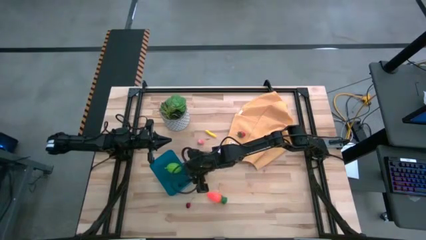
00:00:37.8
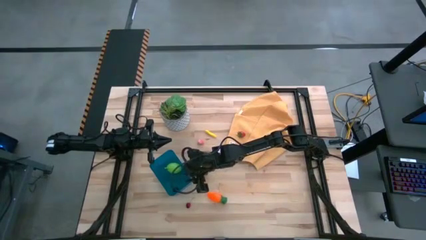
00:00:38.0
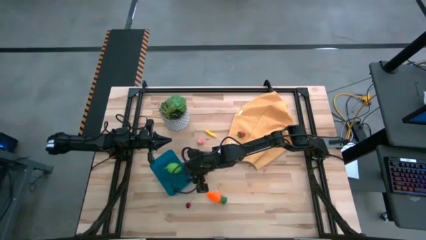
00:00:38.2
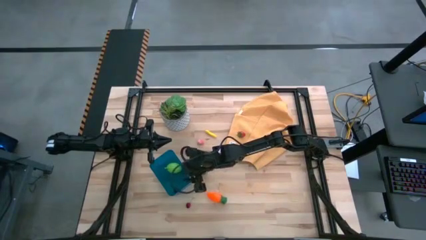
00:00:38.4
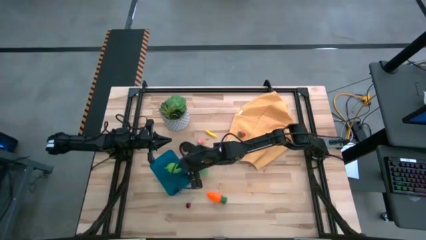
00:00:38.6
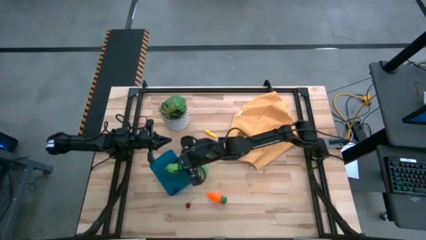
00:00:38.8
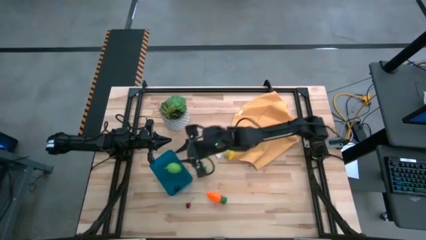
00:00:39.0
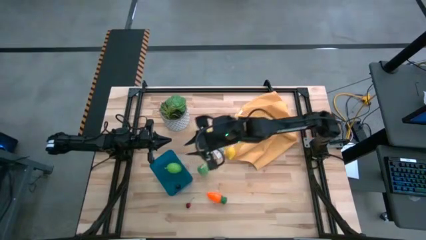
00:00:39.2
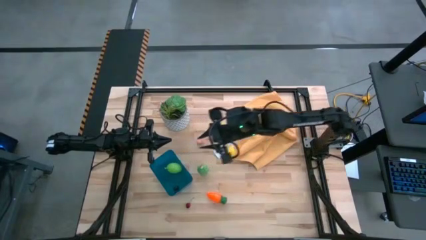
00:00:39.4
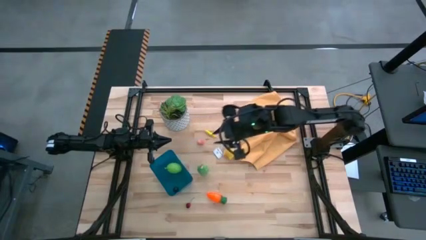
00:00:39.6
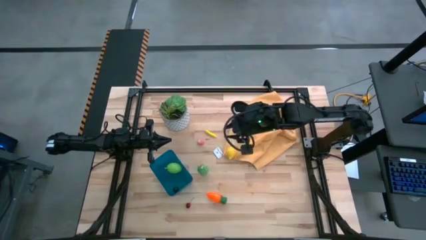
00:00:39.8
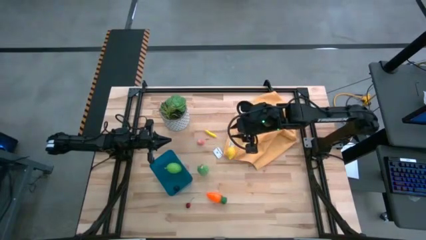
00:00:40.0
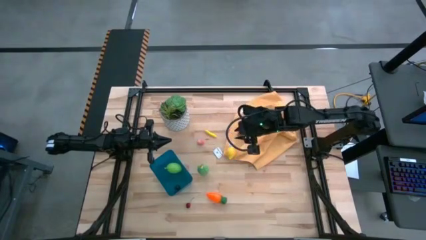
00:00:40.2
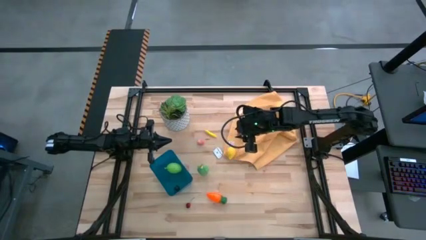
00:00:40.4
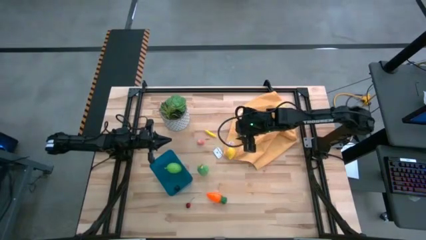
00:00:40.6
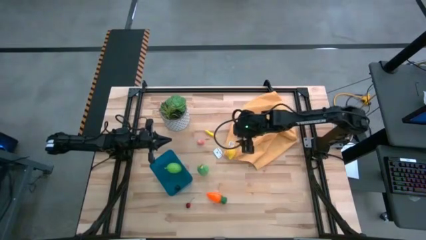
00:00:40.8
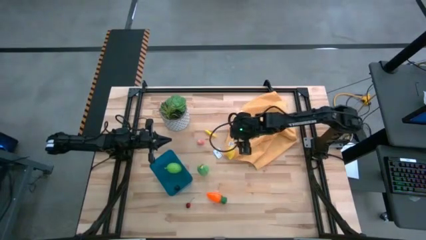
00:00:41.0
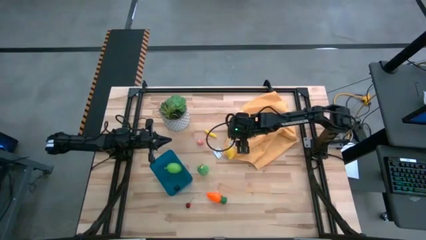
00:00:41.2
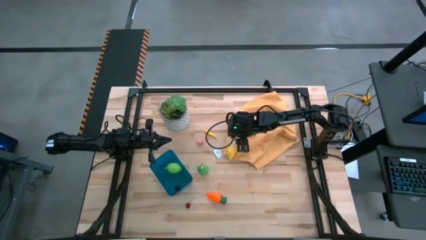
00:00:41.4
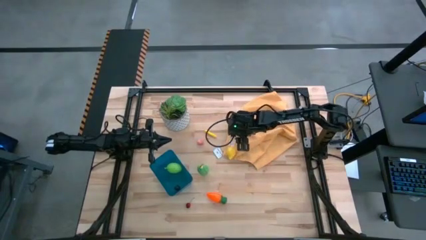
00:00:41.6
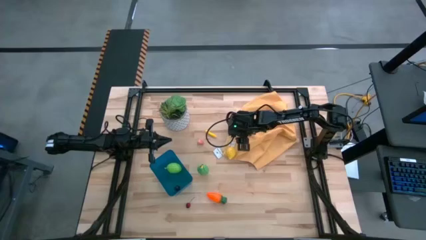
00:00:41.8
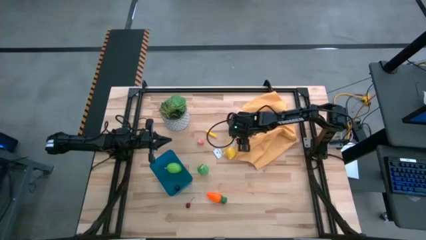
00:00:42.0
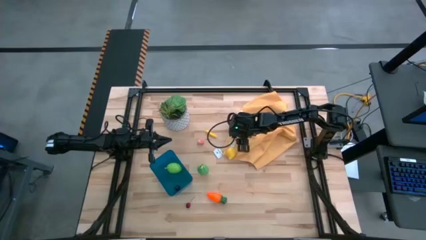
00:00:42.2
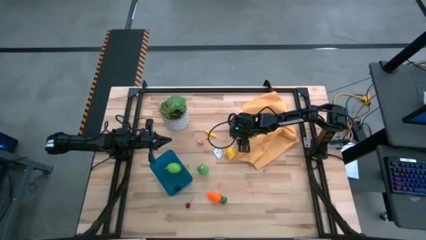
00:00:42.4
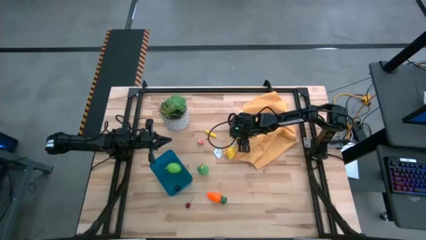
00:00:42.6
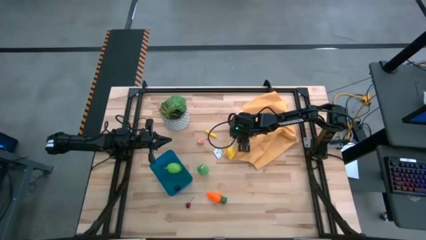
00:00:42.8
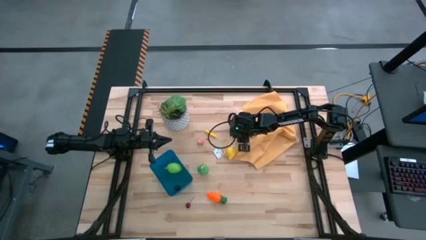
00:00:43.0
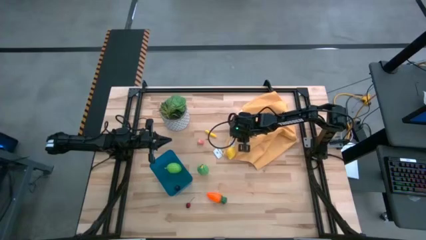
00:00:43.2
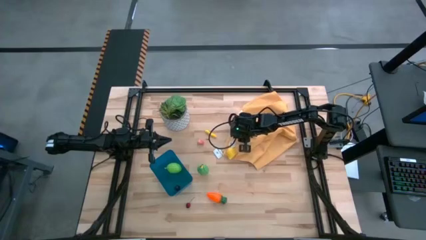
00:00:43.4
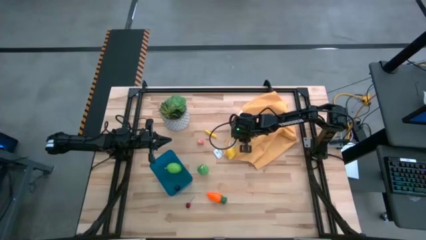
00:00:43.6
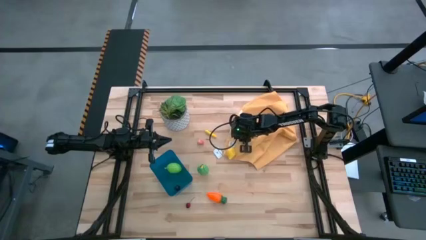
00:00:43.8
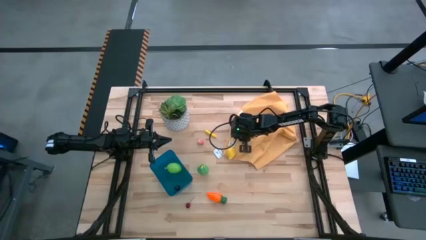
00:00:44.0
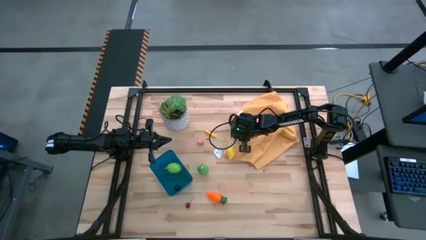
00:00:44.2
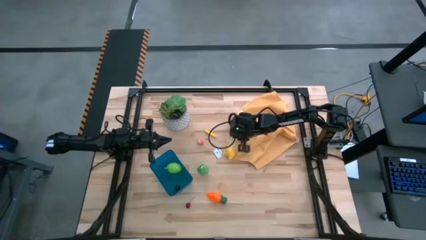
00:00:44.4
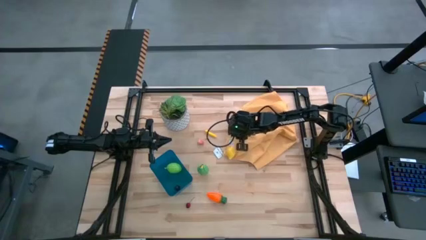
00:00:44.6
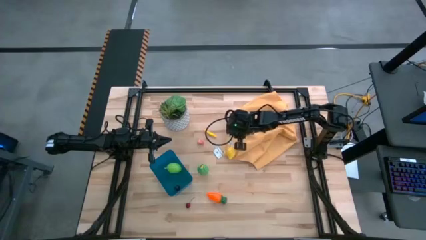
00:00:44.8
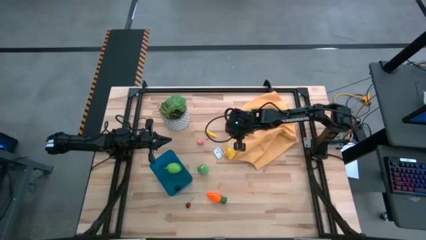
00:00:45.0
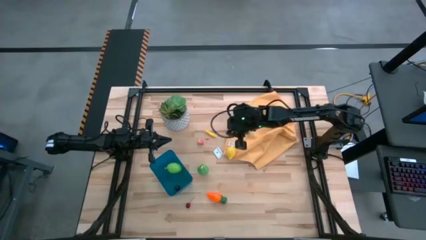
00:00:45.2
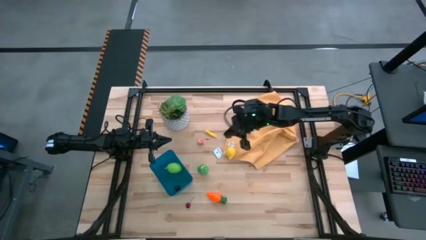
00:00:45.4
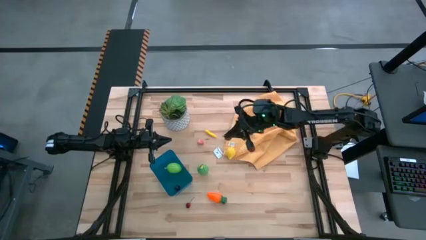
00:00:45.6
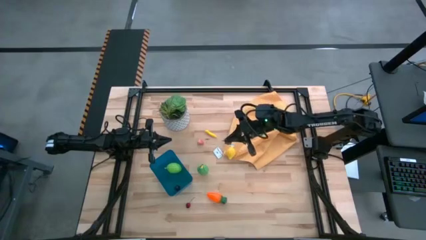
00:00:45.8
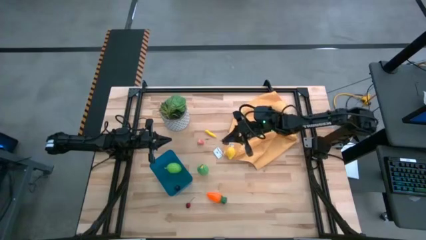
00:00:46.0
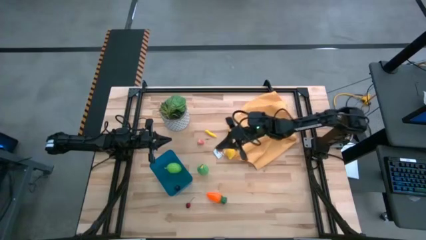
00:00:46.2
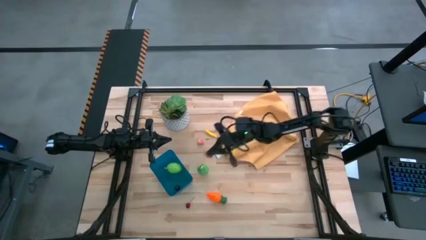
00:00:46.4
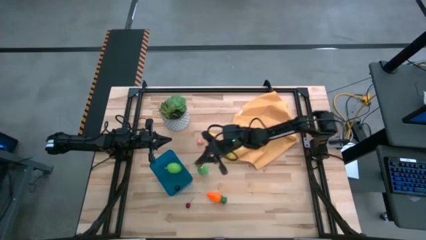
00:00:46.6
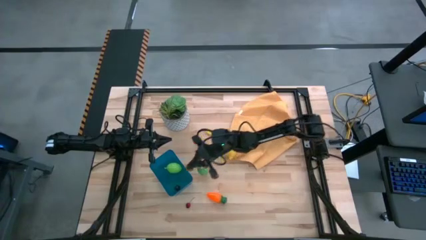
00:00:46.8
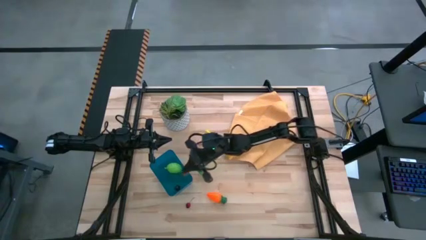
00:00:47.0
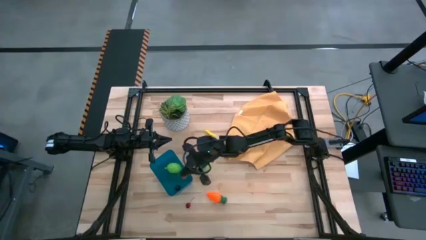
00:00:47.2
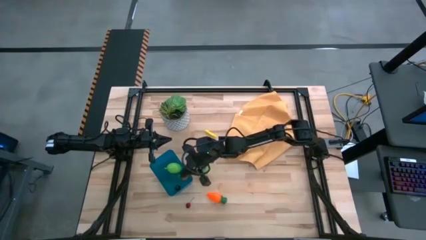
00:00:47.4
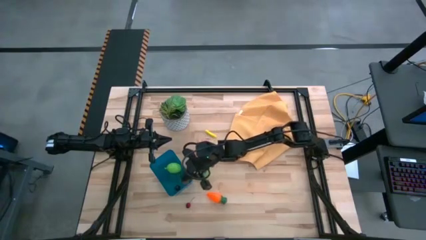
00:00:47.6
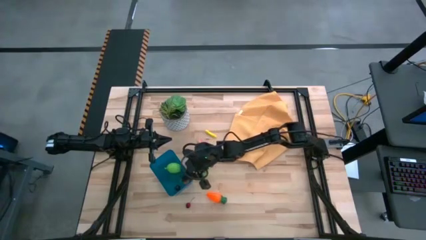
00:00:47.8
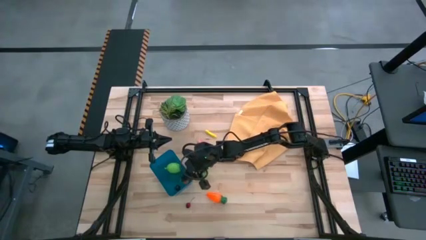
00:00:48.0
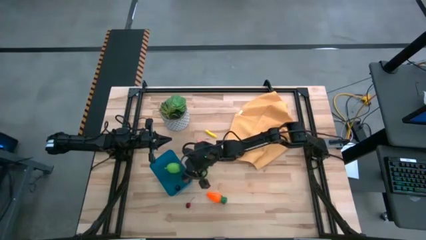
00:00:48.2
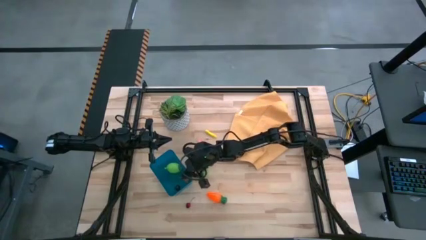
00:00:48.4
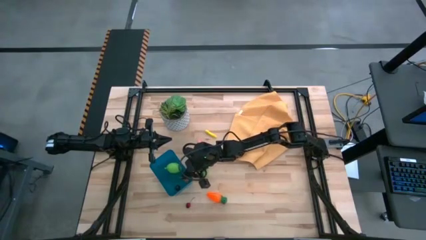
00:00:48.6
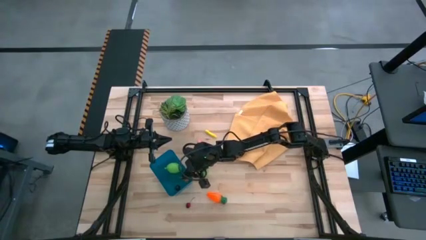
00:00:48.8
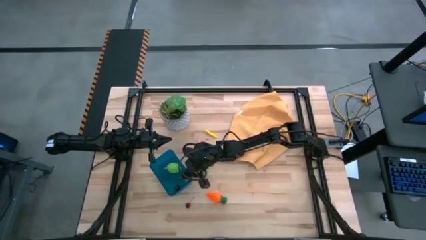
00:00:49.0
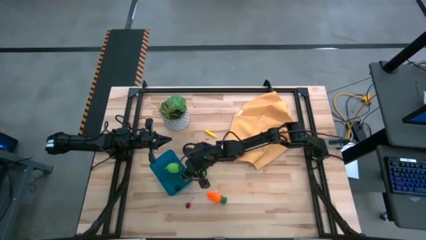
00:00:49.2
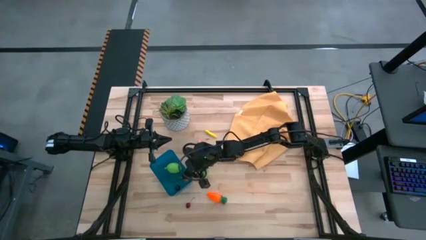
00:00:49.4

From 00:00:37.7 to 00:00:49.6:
Task: Pick and placing Produce into tupperware
Put the red strawberry into the blue bin

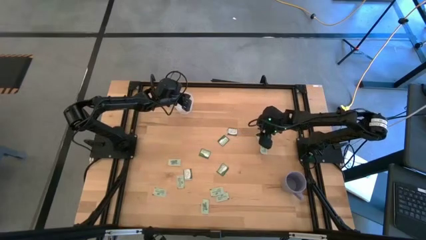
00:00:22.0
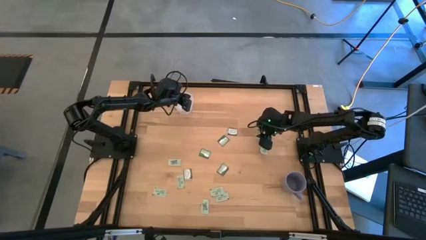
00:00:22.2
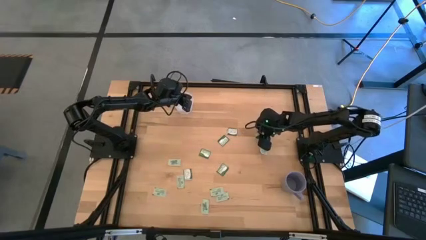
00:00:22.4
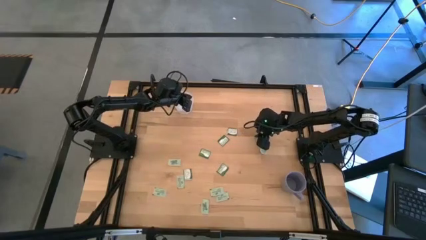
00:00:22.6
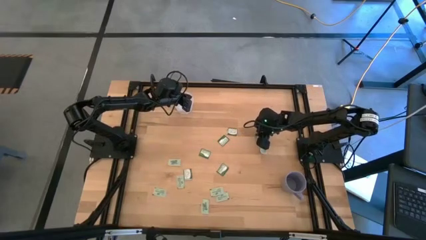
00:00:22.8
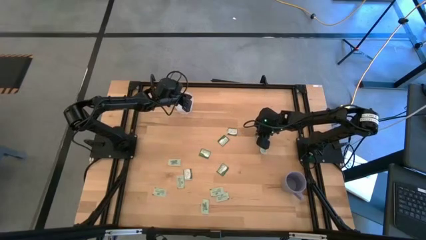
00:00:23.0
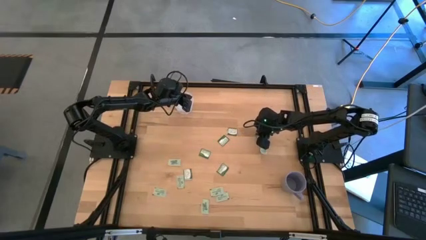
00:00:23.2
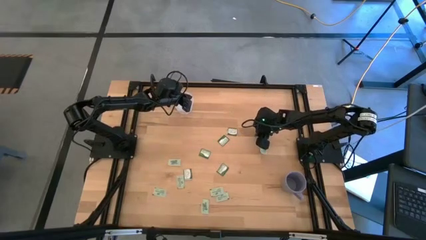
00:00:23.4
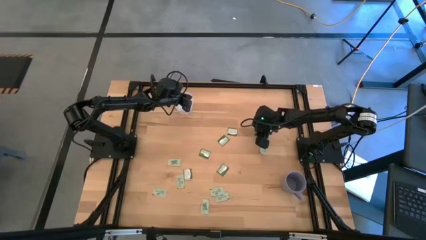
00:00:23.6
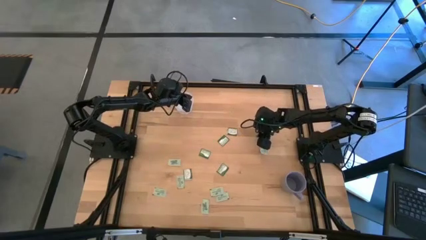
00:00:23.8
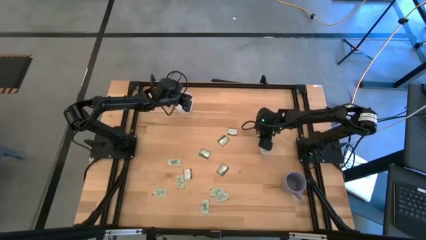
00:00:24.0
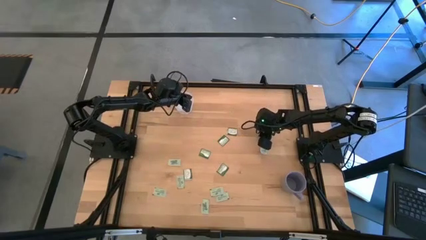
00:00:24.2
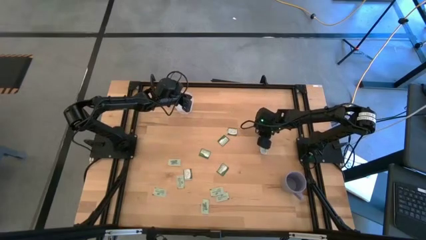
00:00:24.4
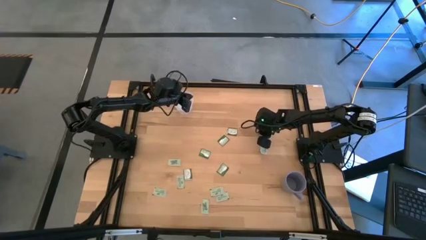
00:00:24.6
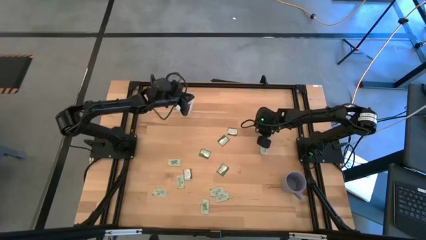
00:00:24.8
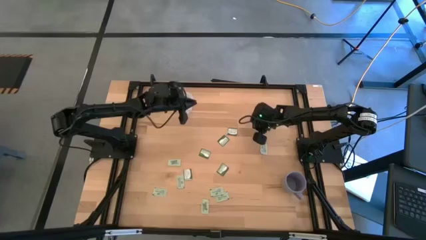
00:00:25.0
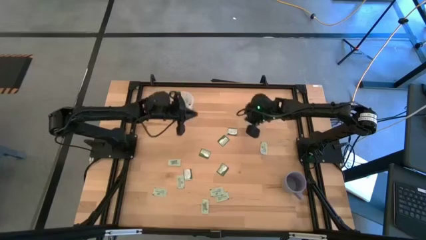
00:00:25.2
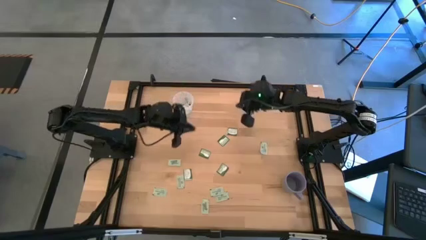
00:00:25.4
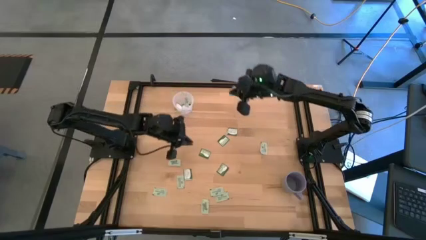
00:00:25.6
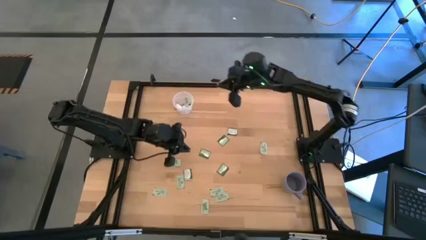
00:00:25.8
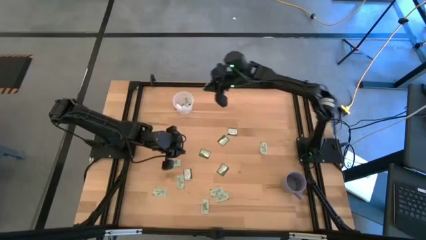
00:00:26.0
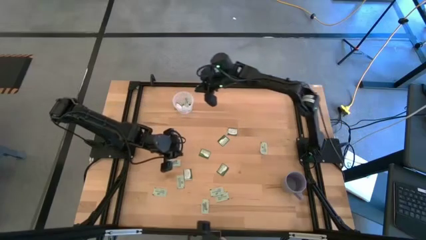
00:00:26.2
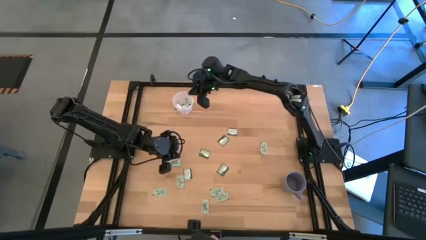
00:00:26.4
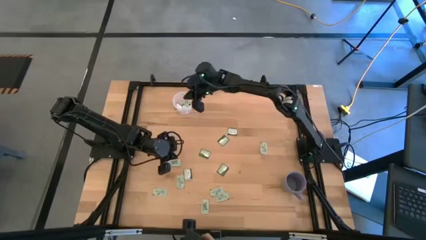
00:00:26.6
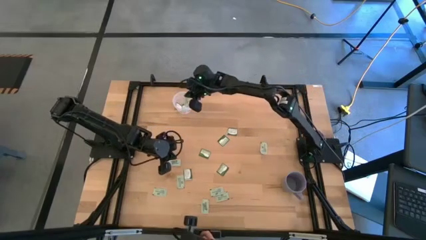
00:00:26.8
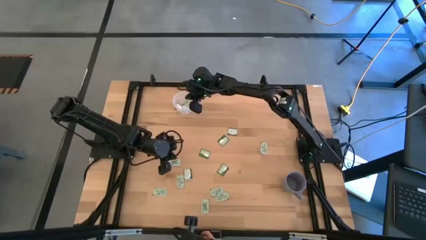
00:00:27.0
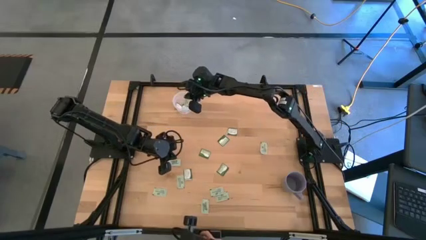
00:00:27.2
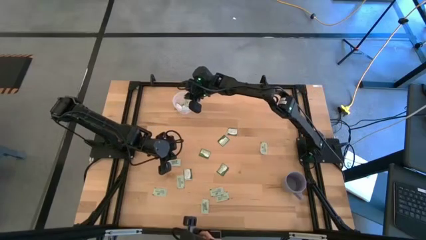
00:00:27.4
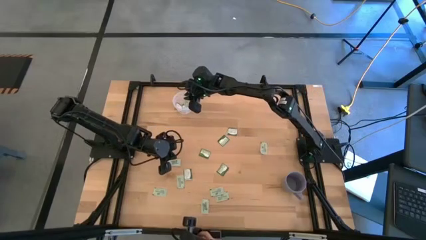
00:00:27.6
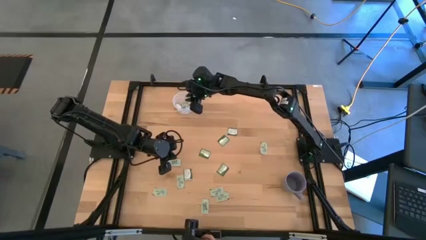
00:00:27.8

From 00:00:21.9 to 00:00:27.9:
Task: Pick and place items into bin
Put the stevia packet into the transparent bin
